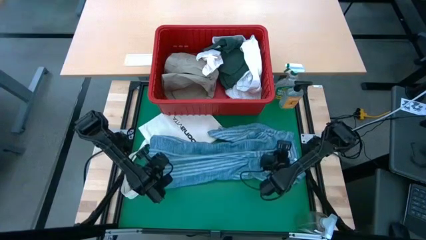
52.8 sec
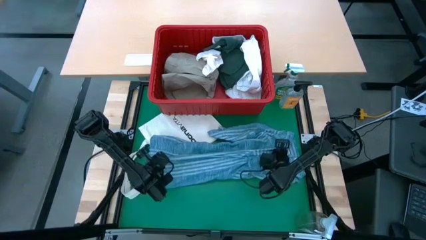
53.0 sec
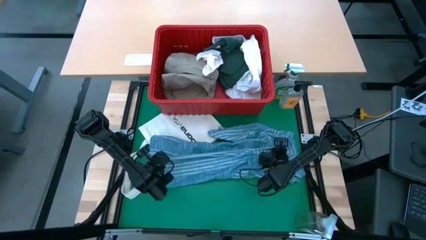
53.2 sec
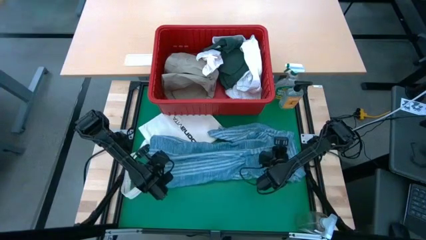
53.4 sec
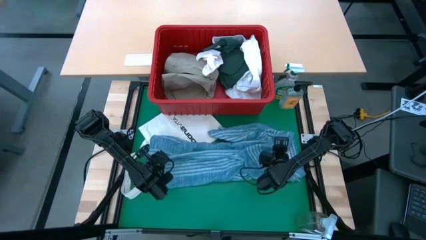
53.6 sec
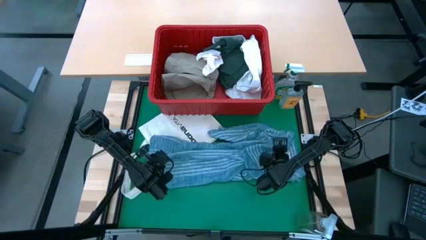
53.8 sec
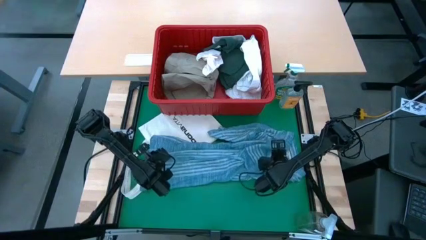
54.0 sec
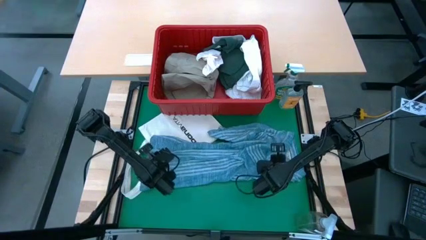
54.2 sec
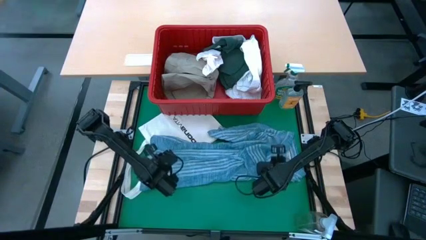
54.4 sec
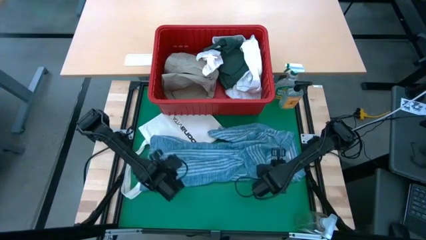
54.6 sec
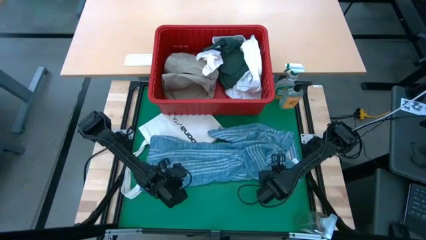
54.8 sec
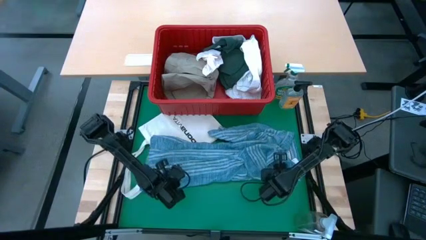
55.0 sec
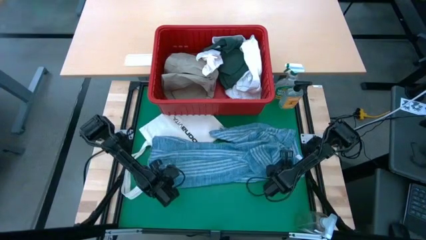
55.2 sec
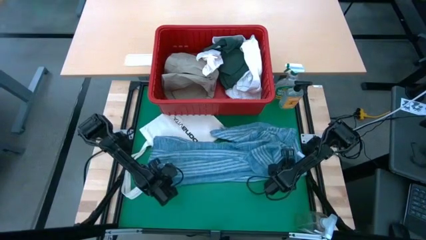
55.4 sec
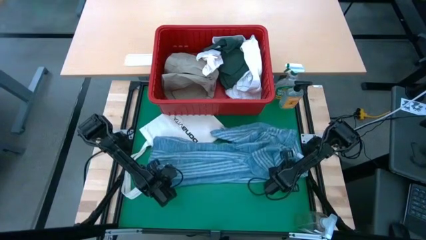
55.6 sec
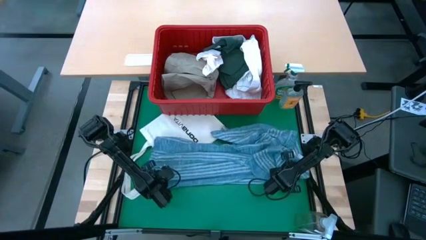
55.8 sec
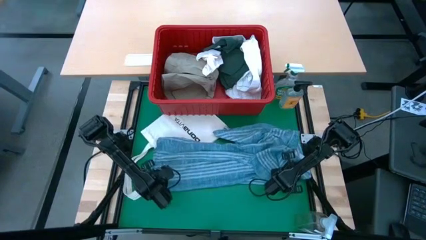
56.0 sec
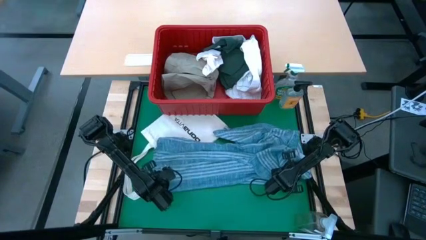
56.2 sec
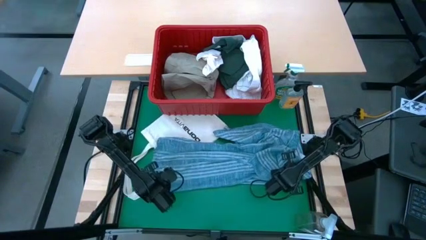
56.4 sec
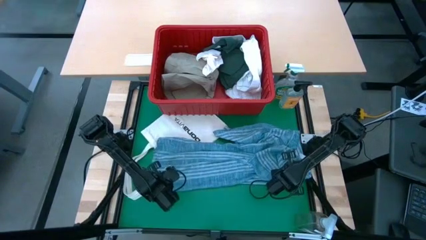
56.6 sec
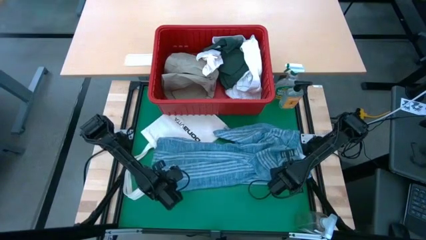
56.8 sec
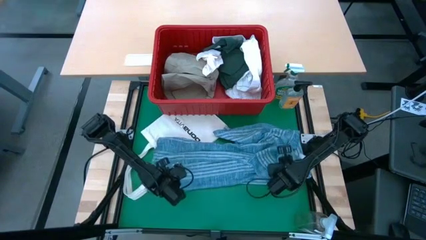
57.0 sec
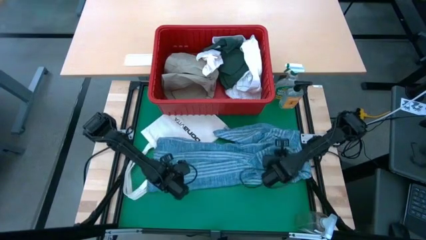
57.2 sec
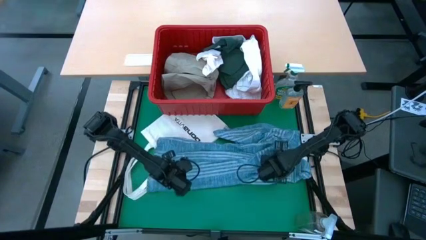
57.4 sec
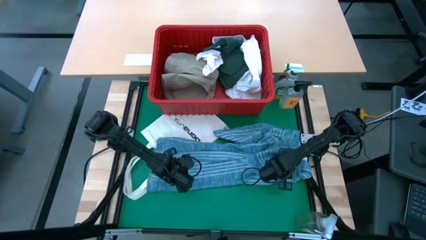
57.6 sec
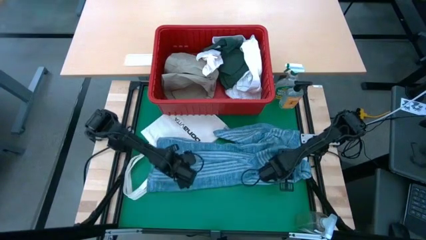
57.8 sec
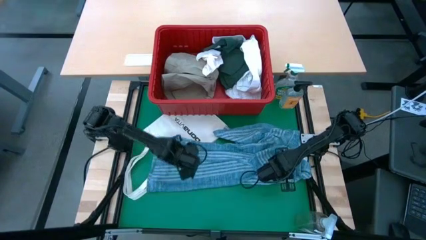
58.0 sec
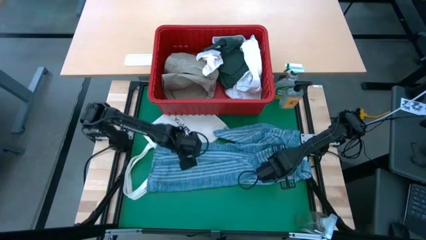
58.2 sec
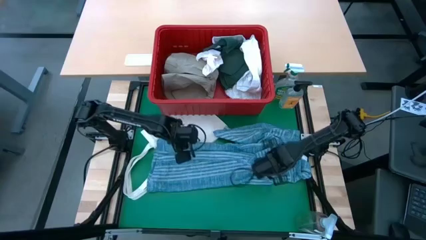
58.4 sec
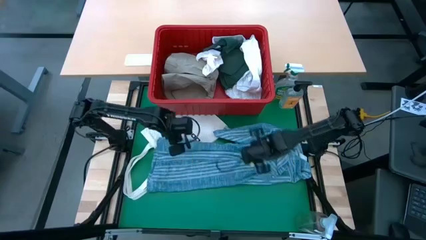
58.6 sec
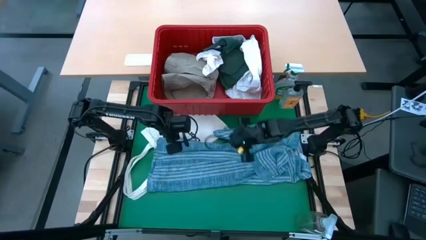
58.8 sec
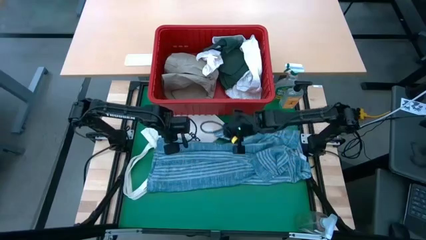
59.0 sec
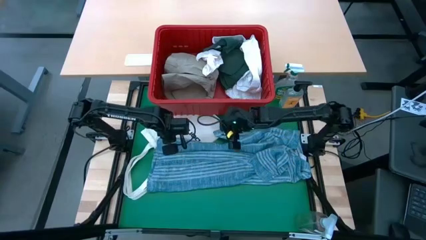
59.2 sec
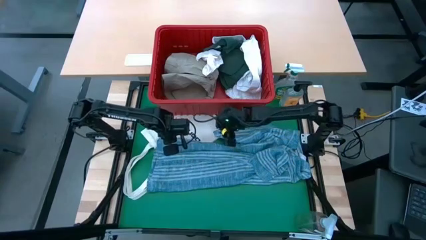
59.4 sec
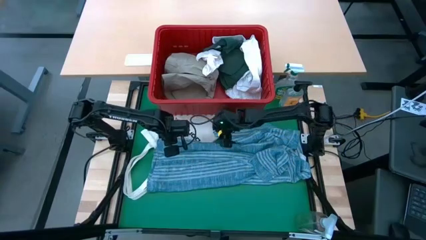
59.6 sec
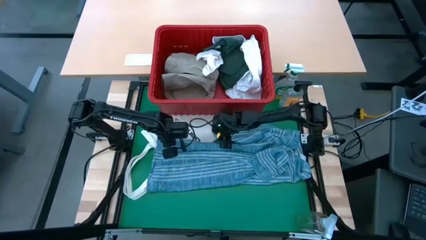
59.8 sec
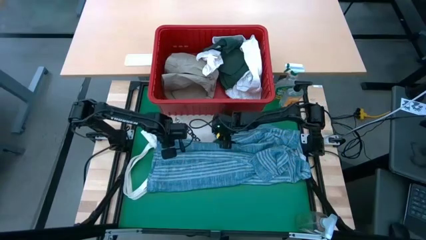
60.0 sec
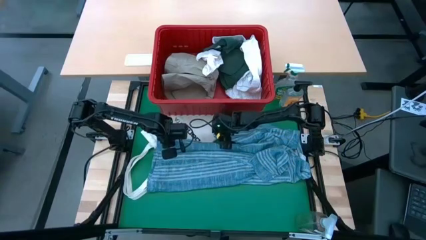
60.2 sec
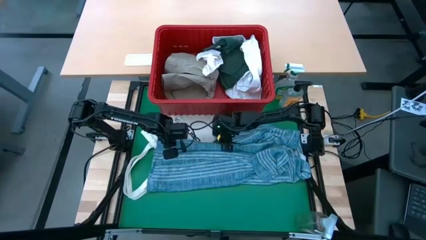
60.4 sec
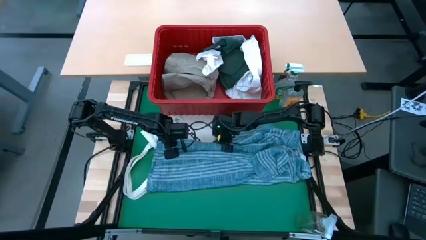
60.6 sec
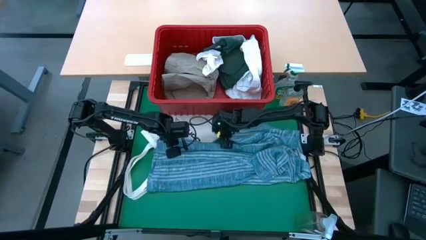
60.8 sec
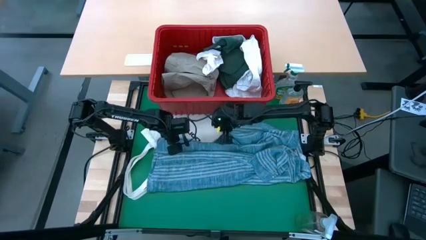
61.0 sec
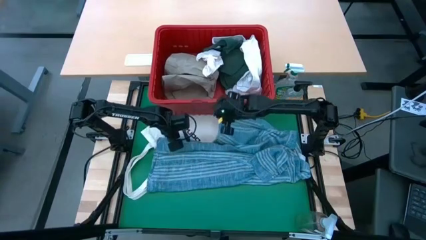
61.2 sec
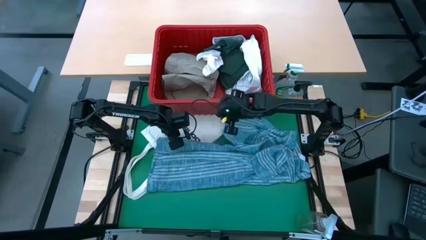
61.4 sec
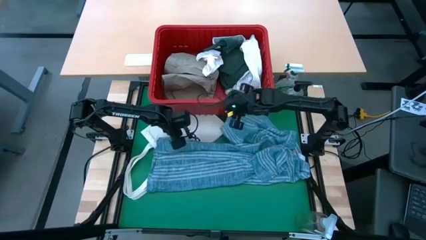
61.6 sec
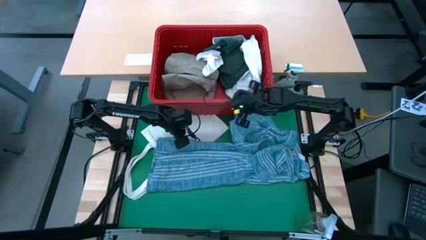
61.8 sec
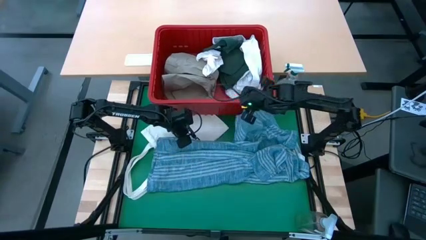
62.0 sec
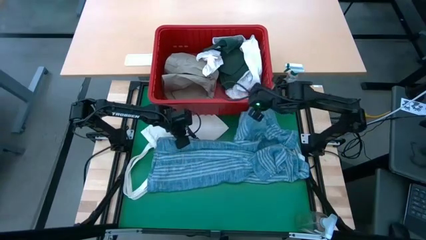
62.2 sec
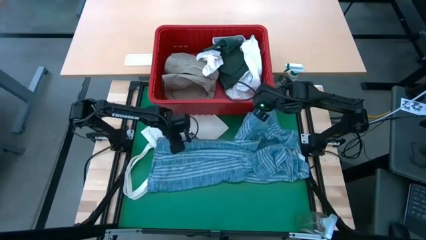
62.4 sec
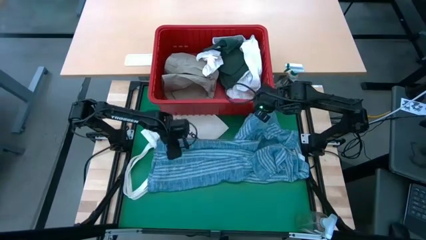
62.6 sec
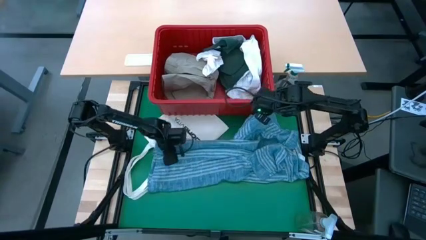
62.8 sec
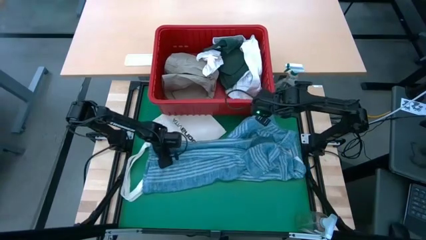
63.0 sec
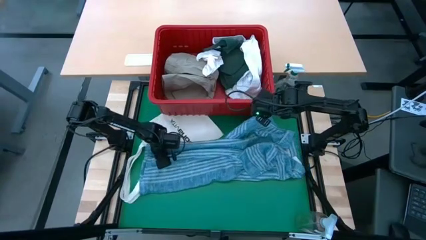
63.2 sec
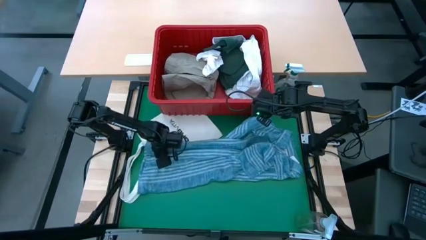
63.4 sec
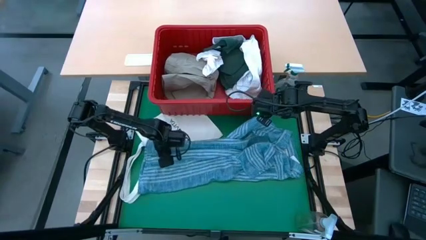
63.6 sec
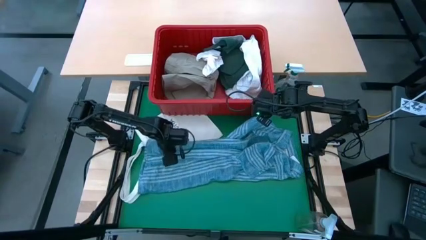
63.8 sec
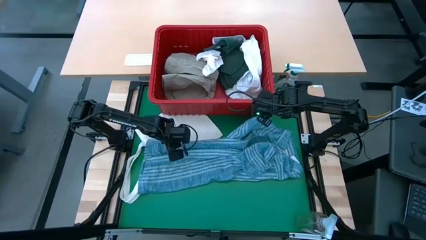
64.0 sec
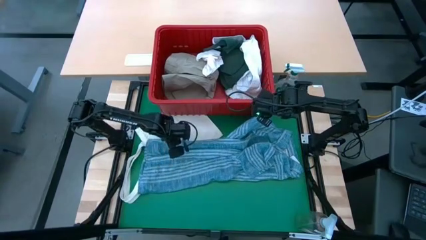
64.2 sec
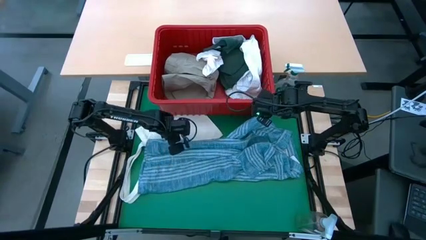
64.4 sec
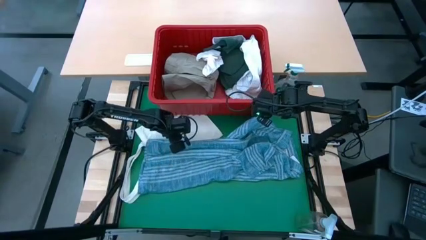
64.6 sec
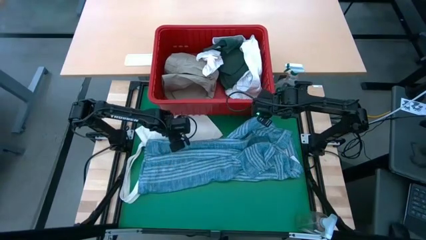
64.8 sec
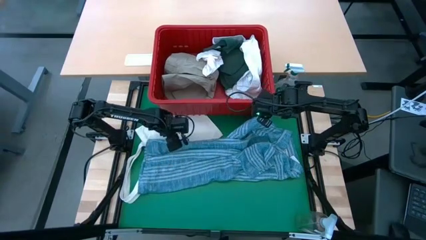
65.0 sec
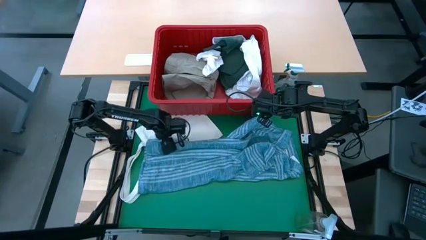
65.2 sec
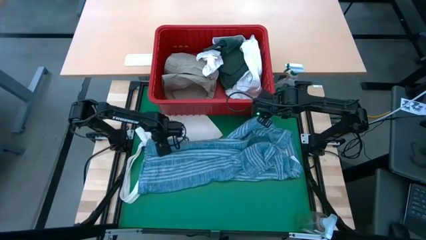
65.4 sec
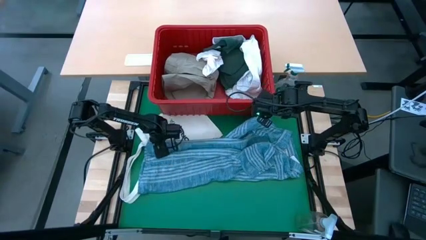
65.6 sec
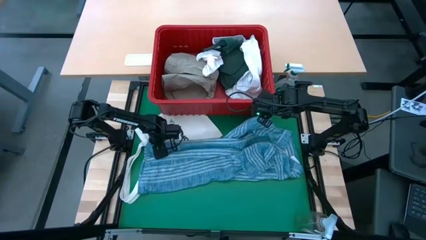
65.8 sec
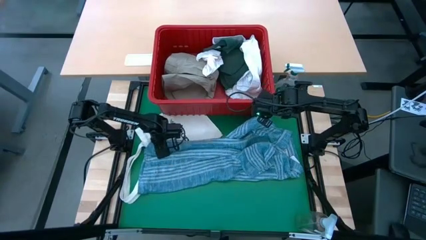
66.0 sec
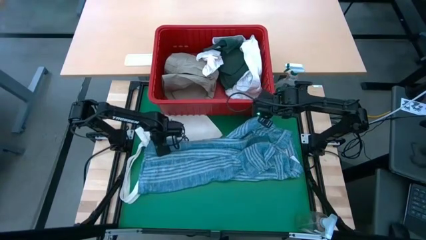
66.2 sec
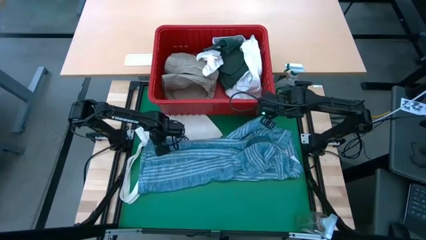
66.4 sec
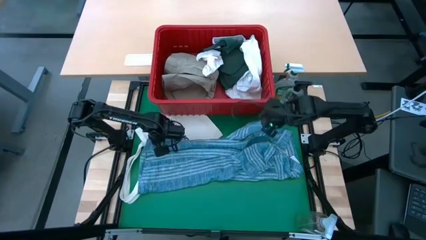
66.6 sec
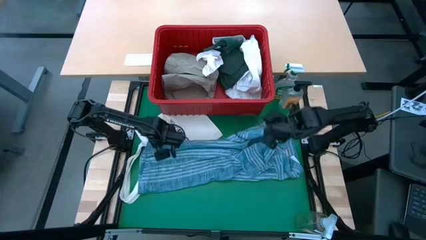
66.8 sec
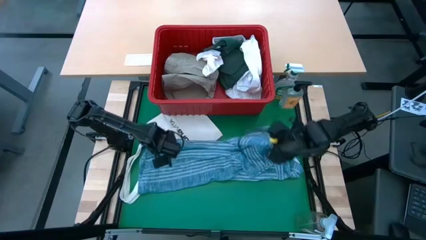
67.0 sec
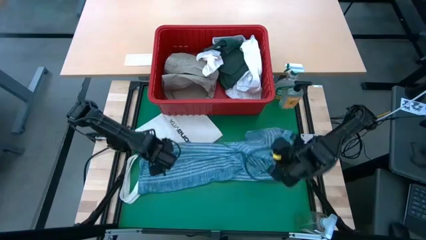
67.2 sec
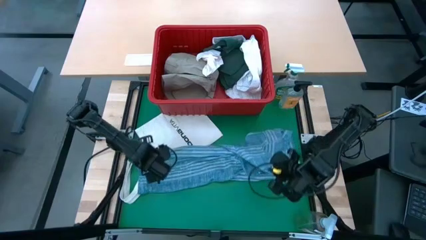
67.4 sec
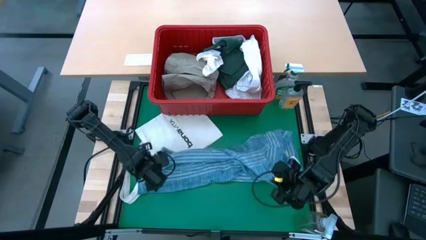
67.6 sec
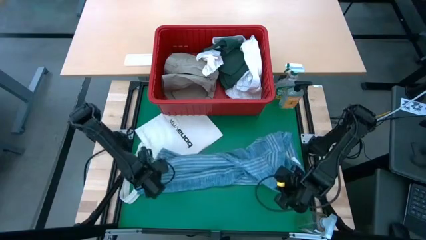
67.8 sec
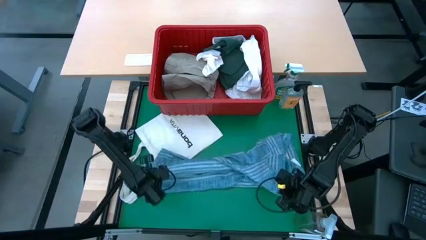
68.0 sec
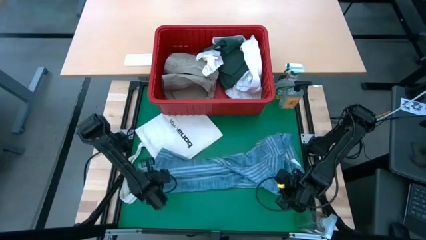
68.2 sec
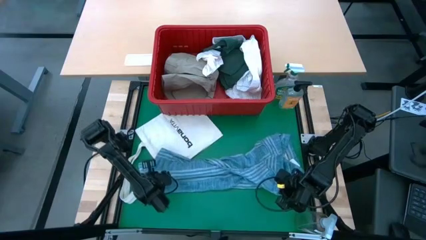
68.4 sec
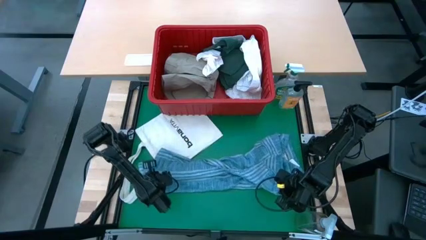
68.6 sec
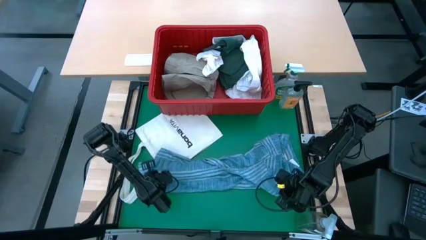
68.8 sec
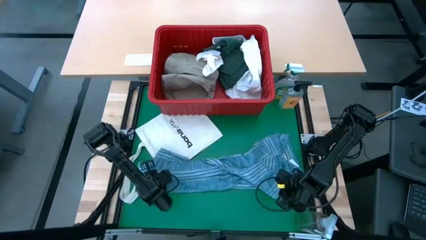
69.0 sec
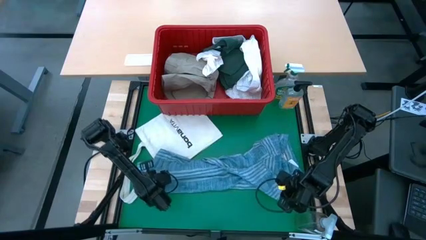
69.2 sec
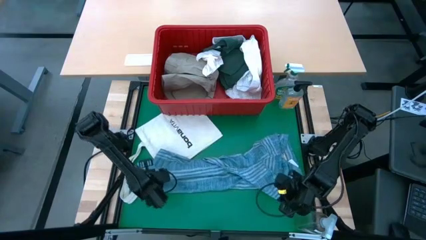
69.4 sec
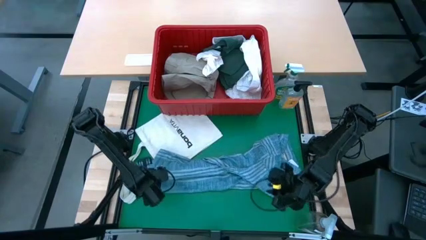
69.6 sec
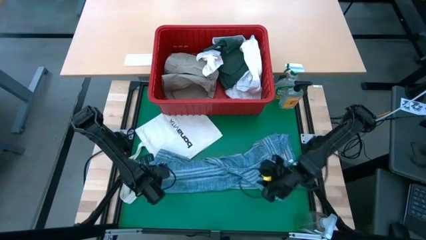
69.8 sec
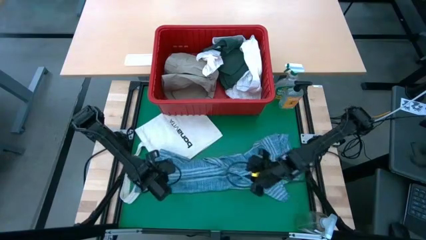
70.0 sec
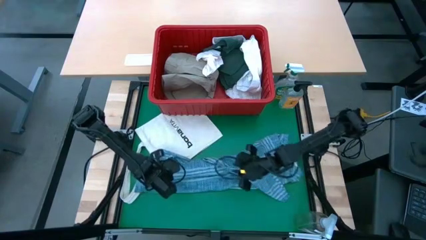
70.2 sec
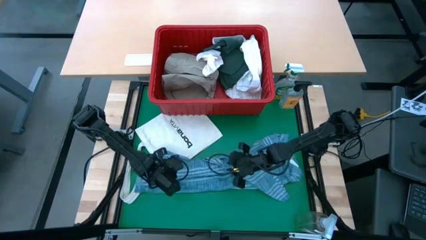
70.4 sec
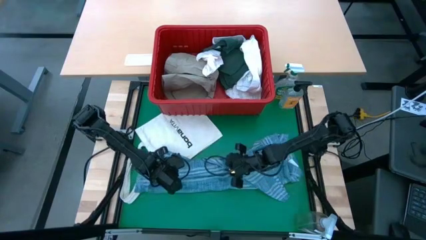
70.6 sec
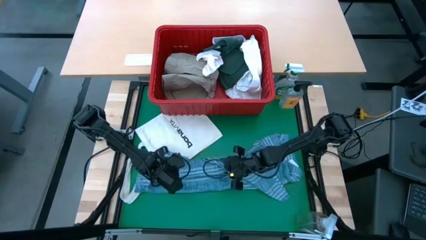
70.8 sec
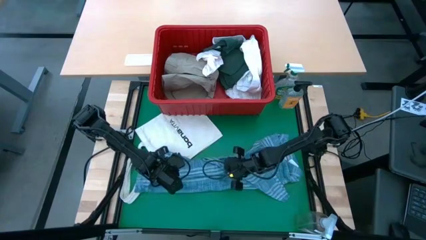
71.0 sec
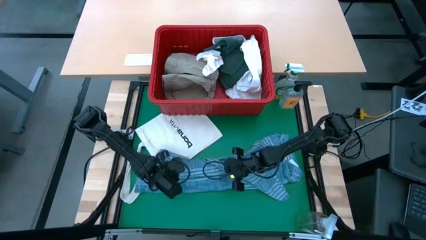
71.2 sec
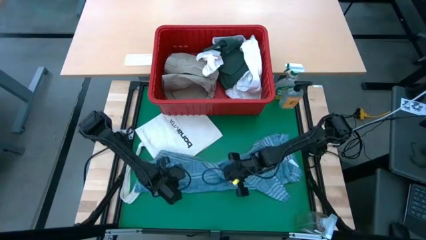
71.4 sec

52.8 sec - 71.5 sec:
Task: Fold Laundry from Bin
Fold the blue polo shirt
